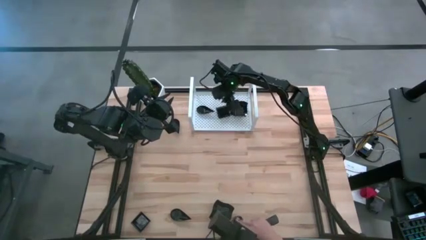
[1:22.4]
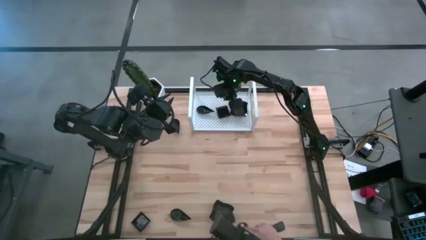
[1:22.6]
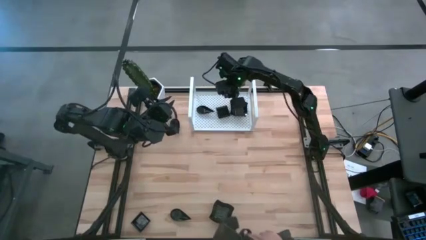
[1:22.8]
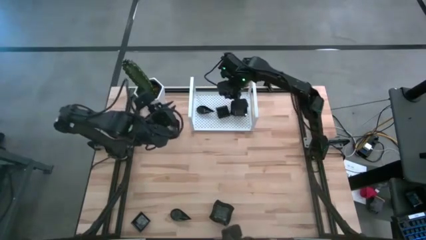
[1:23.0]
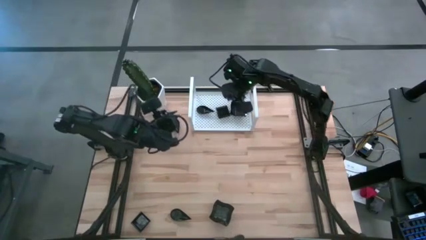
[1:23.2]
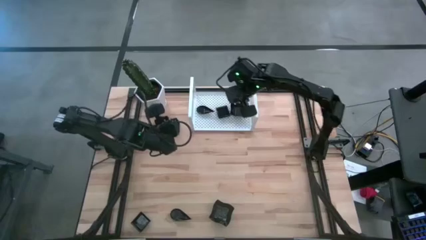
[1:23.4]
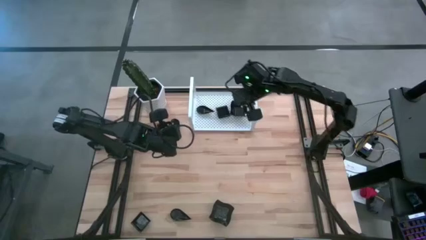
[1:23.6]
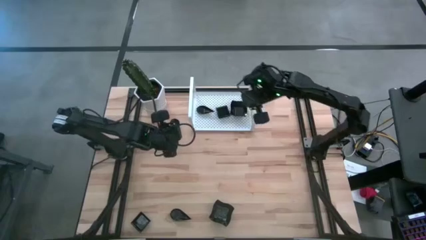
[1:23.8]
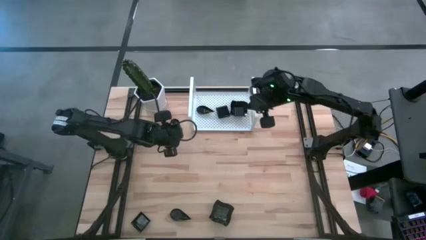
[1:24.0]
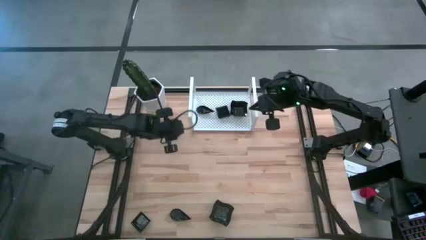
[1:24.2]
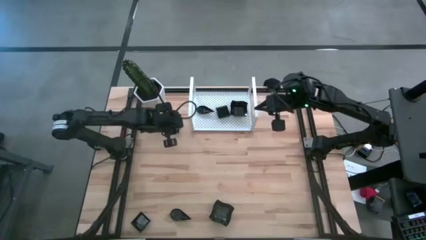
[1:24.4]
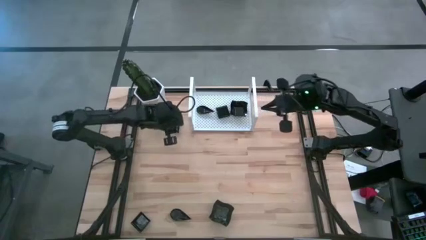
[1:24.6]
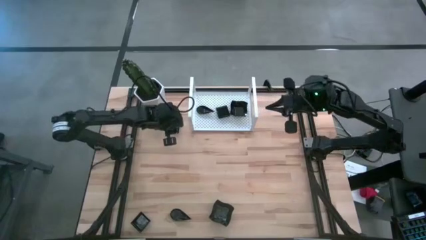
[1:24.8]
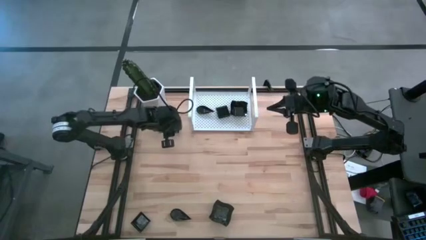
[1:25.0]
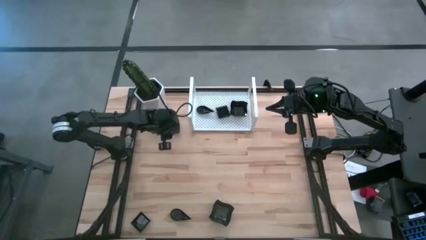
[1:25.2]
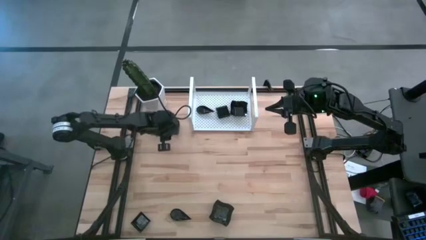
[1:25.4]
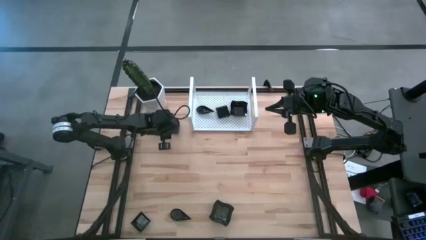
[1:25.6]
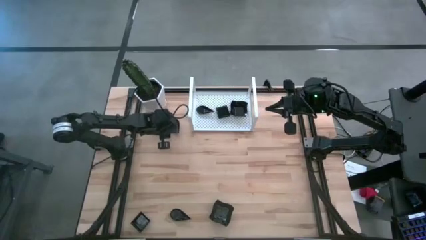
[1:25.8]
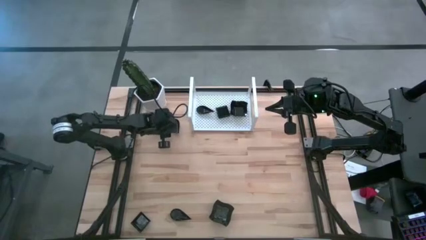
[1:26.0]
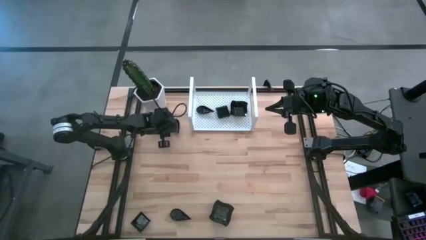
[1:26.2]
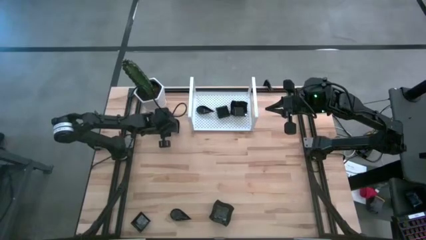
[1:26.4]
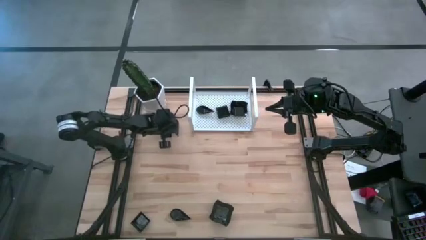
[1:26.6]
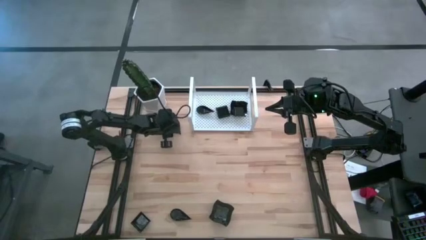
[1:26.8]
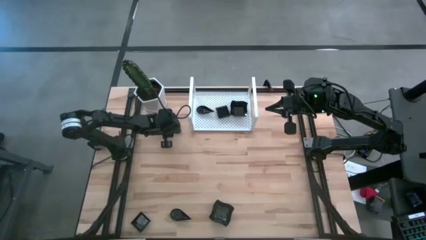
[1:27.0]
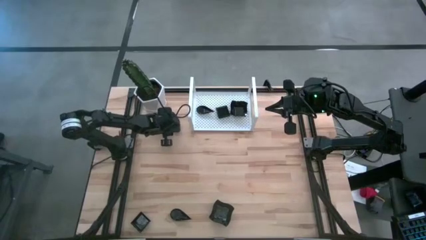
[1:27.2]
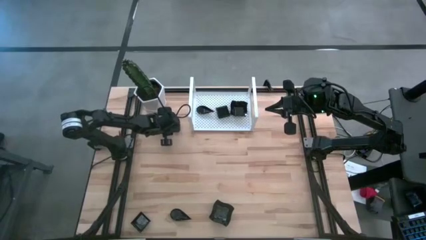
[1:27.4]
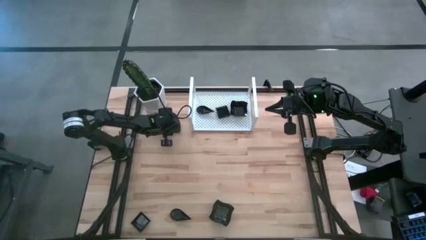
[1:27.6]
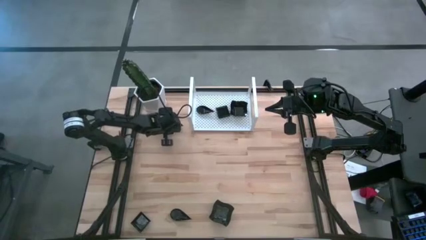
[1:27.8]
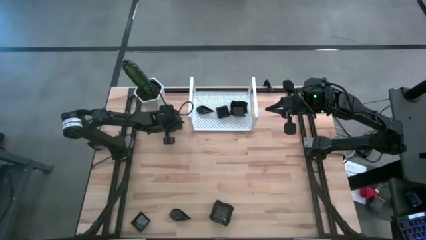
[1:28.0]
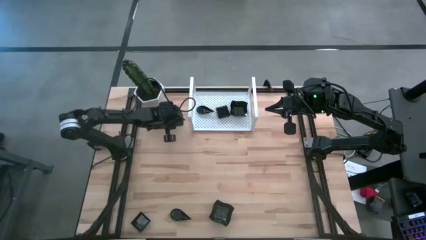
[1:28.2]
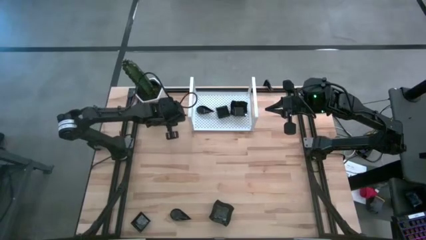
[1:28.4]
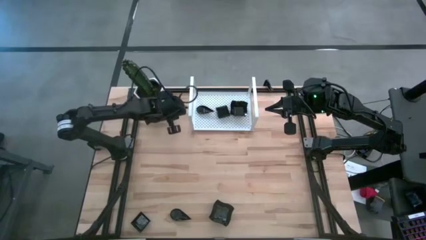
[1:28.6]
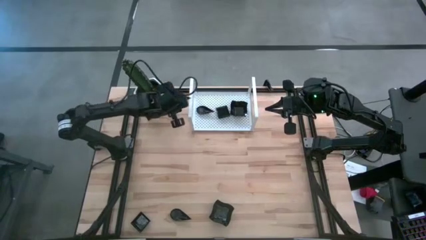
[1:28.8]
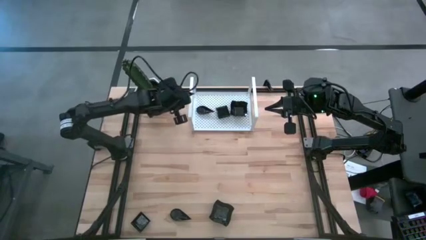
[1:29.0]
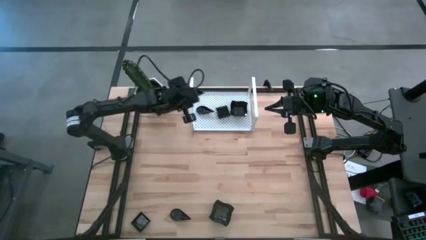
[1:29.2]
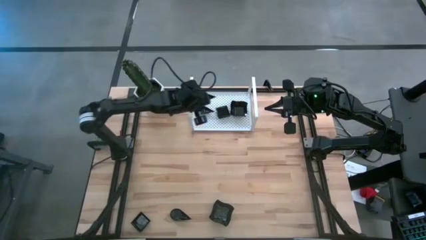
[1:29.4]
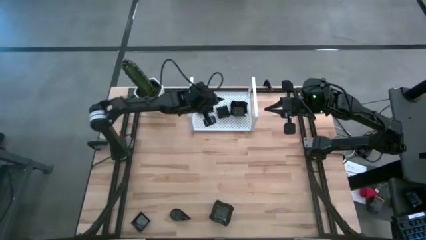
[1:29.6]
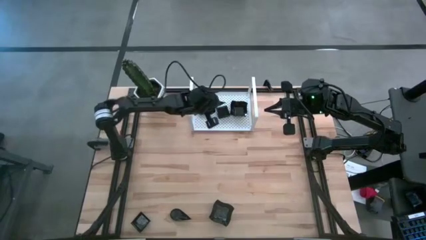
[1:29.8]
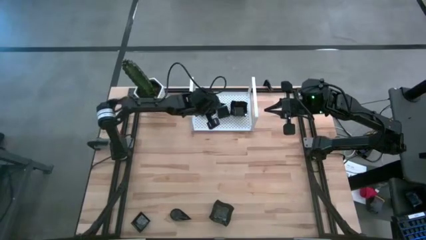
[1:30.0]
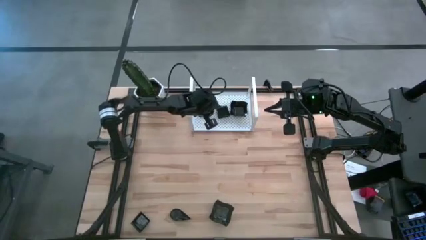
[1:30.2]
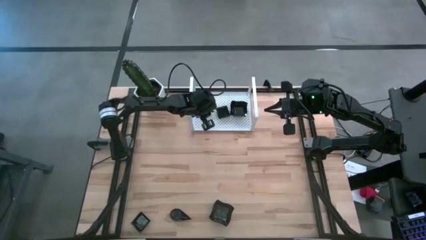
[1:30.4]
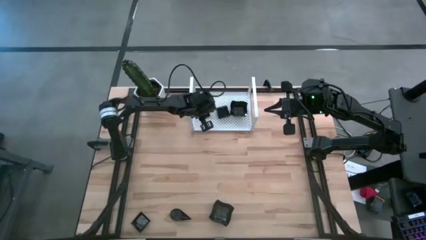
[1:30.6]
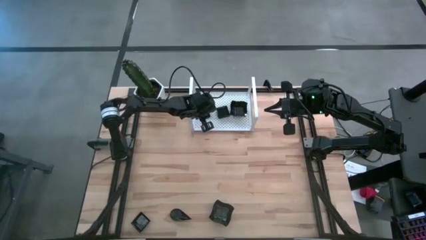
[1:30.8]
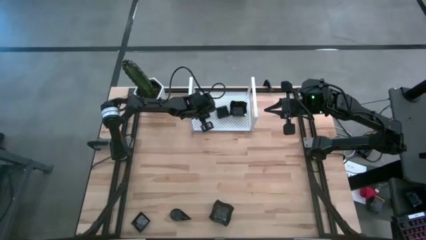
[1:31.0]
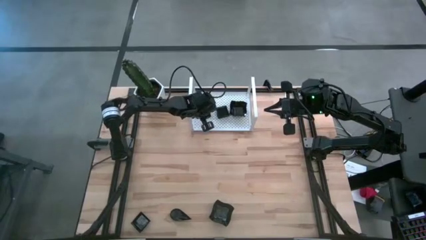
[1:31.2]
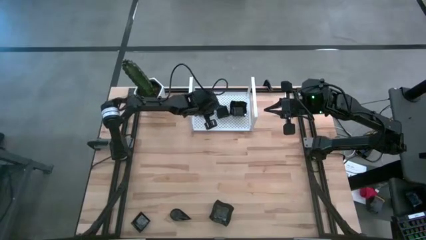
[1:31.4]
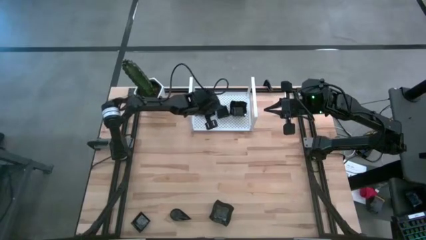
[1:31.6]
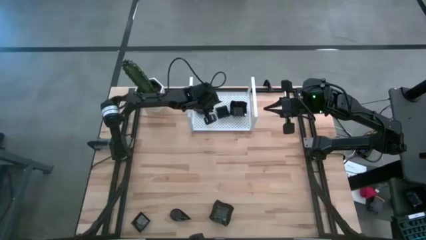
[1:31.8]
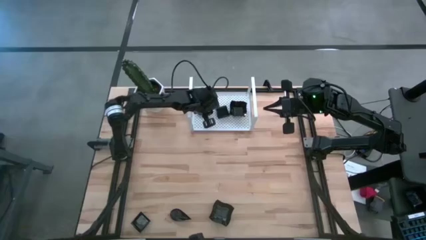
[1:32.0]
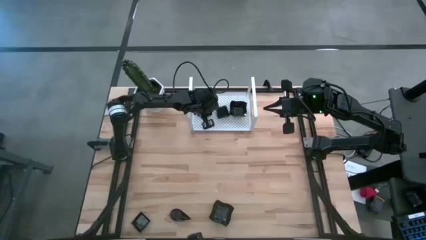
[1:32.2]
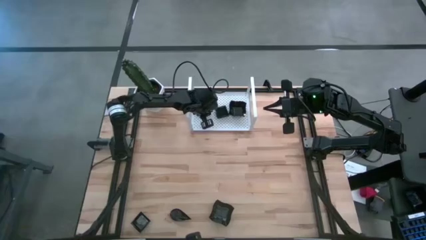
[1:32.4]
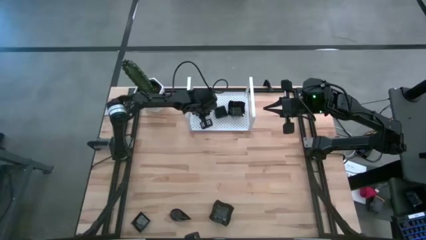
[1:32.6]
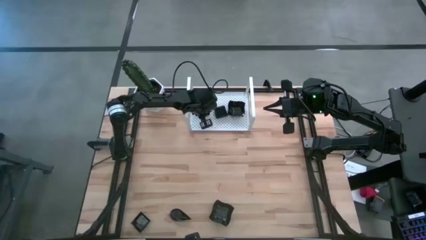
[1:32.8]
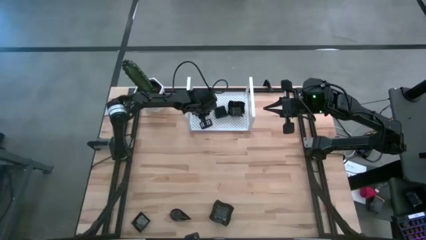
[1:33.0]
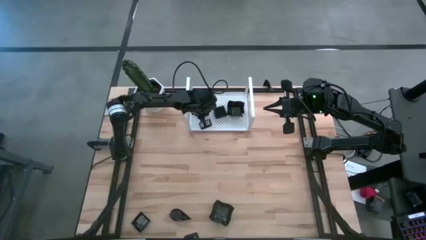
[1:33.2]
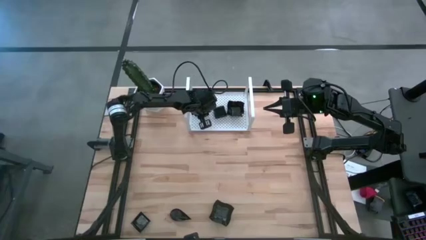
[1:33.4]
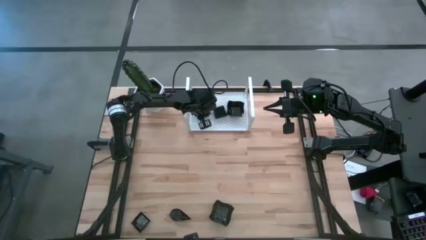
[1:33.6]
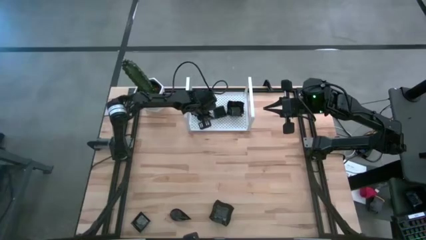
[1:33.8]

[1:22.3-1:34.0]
Task: Pick & Place Mini shaped plates
Stack the black drop-shaped plate on top of the black drop-shaped plate on the shelf

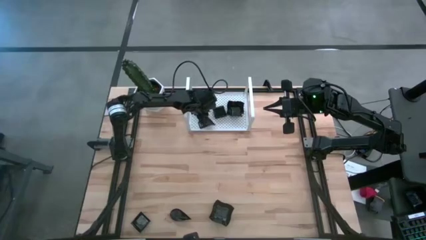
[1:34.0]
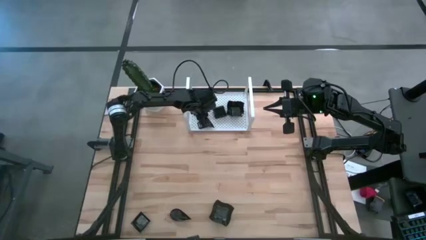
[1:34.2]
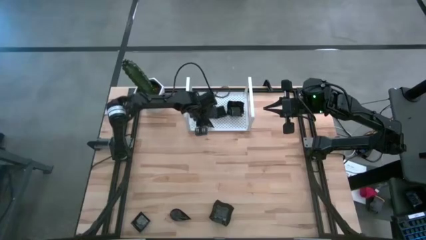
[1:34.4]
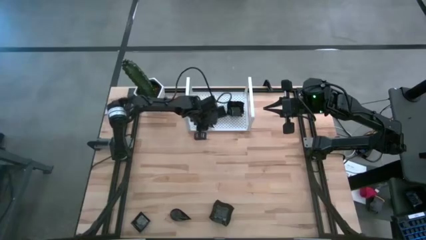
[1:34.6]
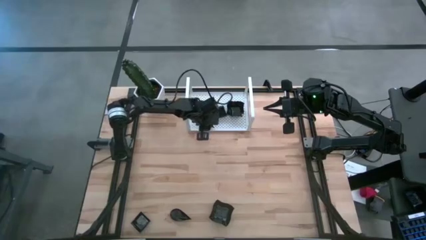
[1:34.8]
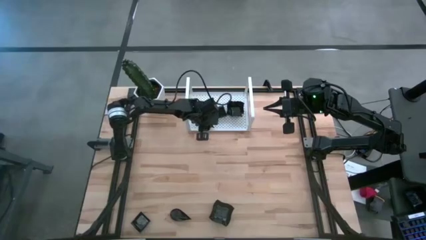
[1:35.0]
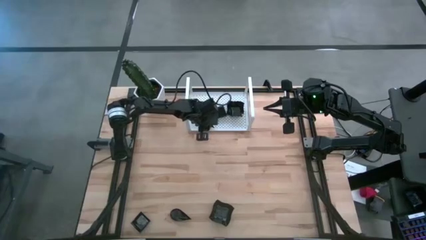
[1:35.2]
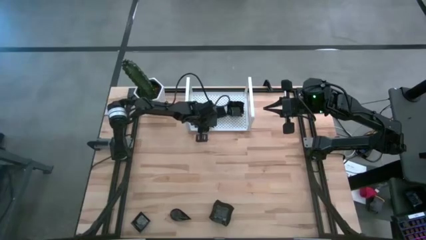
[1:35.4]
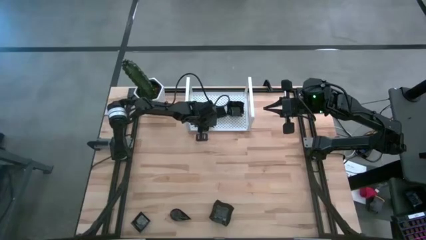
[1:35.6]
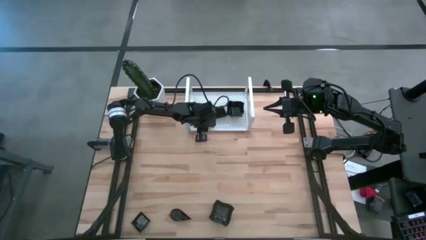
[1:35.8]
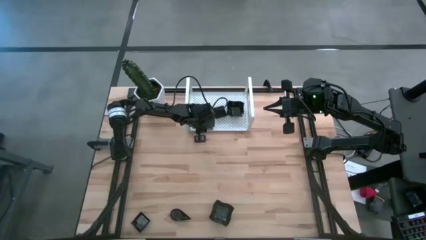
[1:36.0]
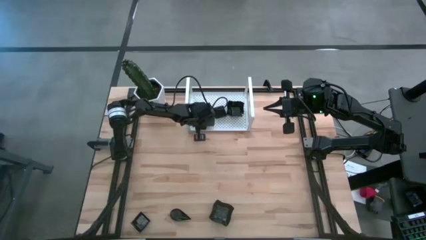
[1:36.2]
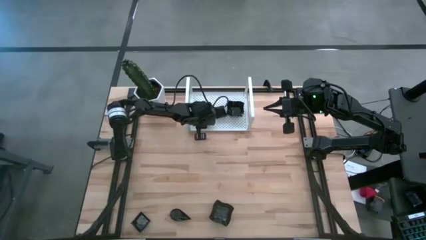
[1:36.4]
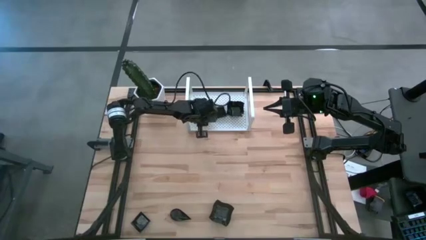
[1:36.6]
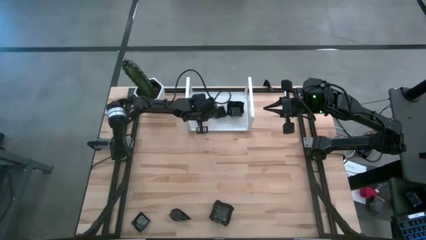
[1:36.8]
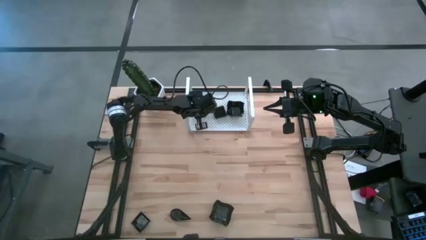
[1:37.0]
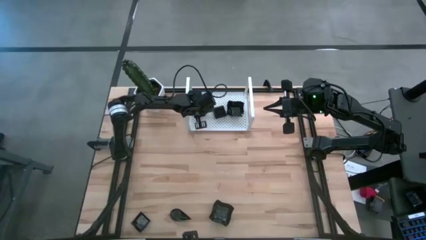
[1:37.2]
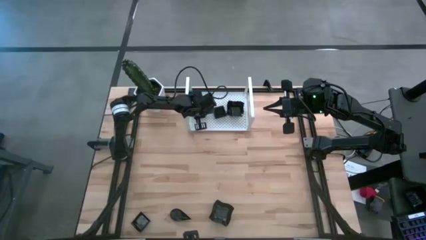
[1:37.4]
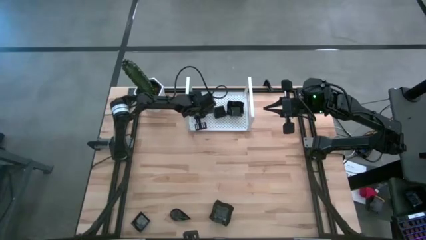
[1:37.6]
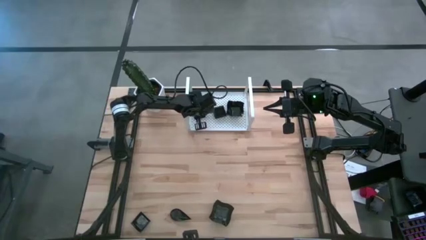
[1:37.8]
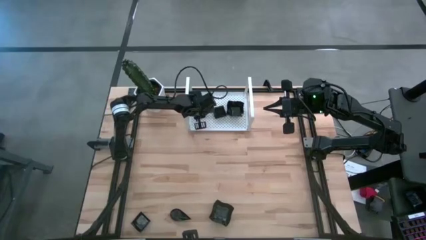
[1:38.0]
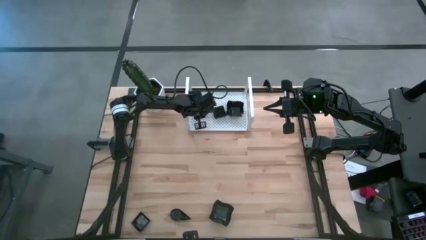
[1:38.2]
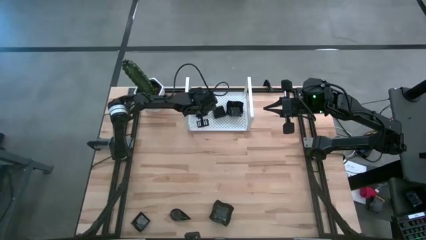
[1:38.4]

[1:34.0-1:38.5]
Stack the black drop-shaped plate on top of the black drop-shaped plate on the shelf
